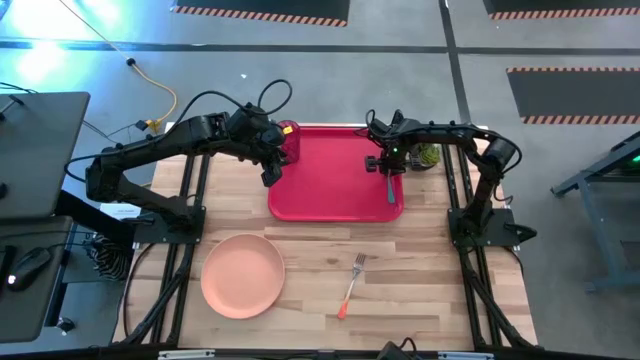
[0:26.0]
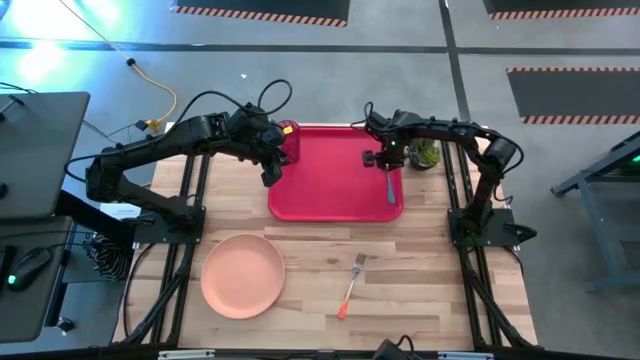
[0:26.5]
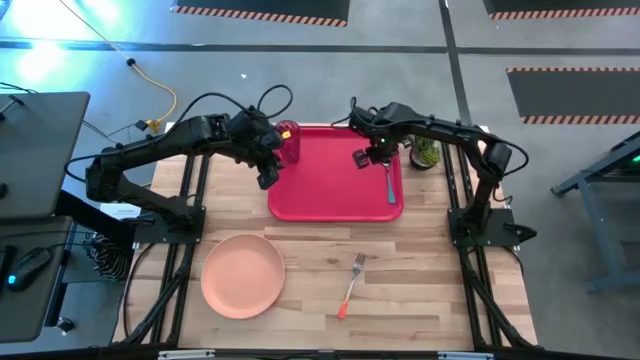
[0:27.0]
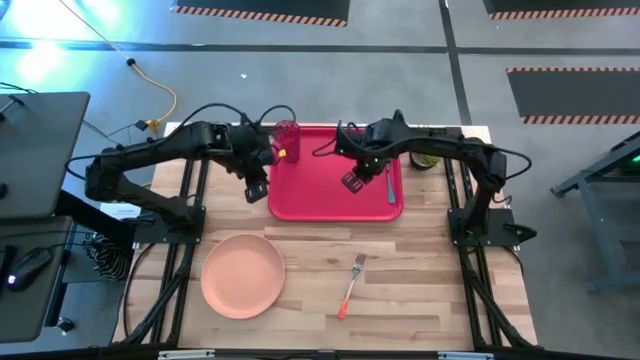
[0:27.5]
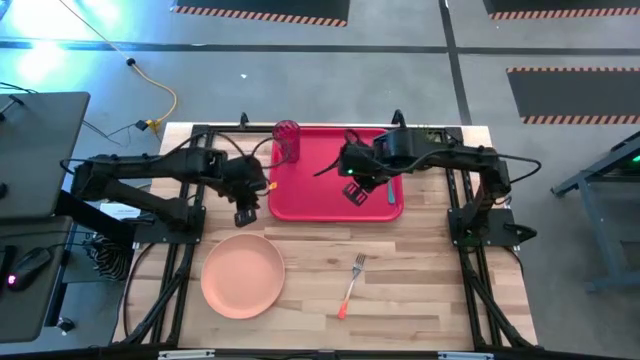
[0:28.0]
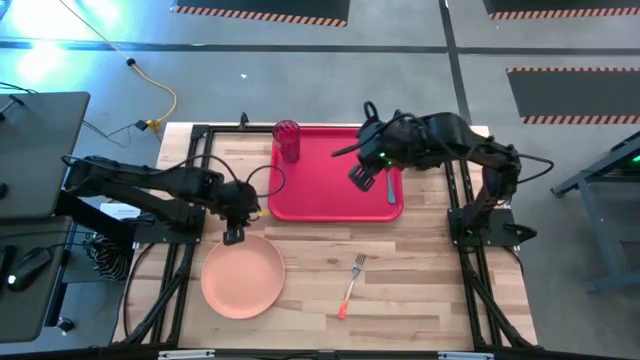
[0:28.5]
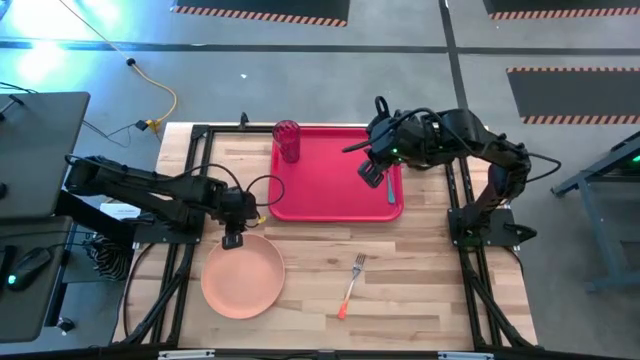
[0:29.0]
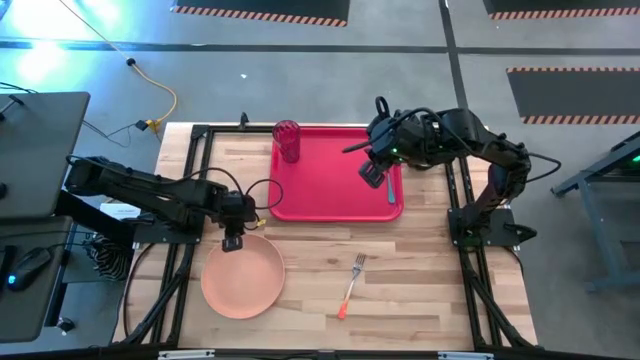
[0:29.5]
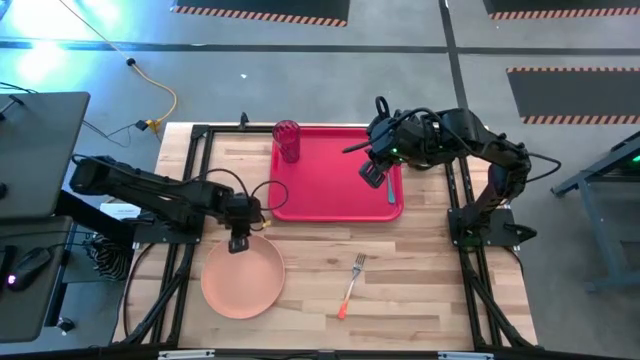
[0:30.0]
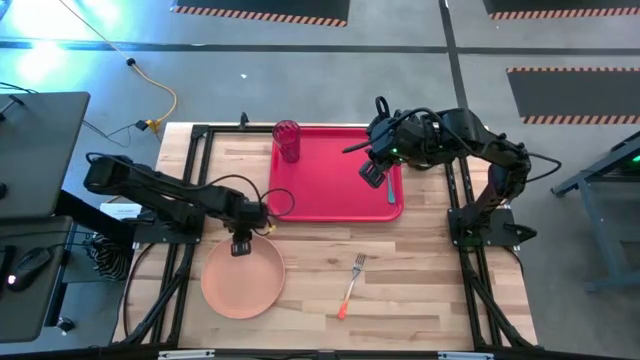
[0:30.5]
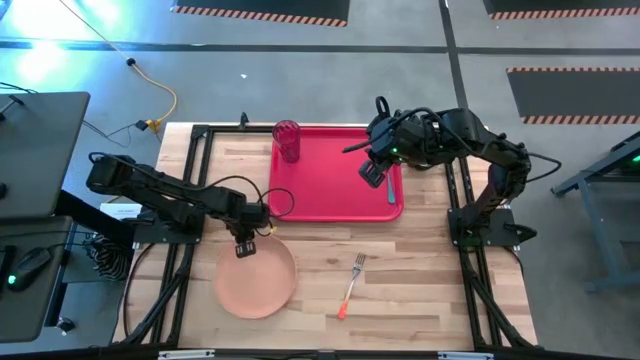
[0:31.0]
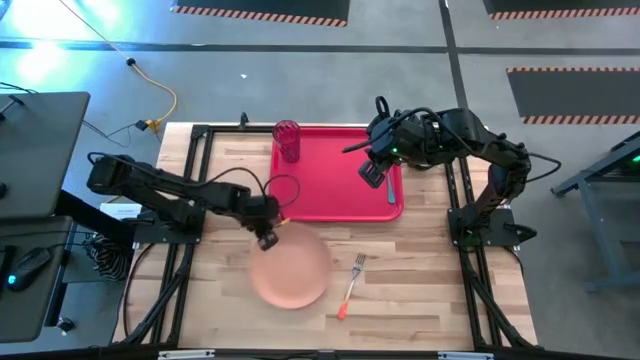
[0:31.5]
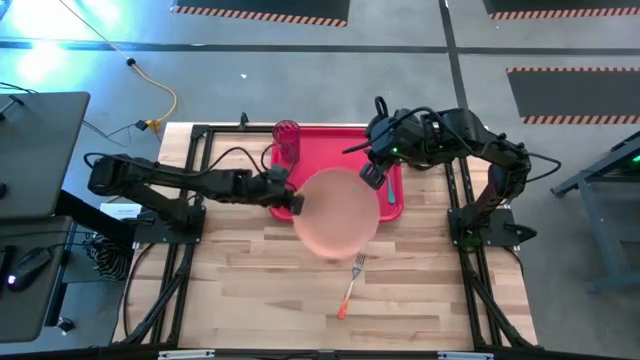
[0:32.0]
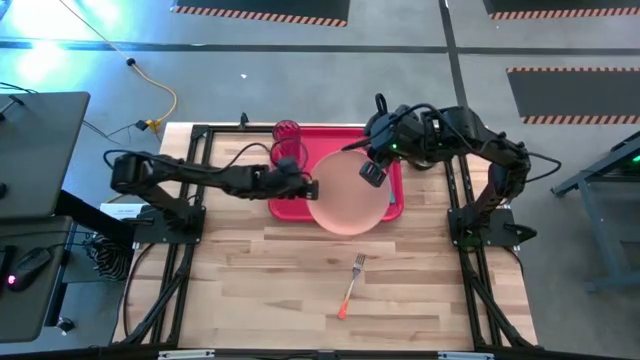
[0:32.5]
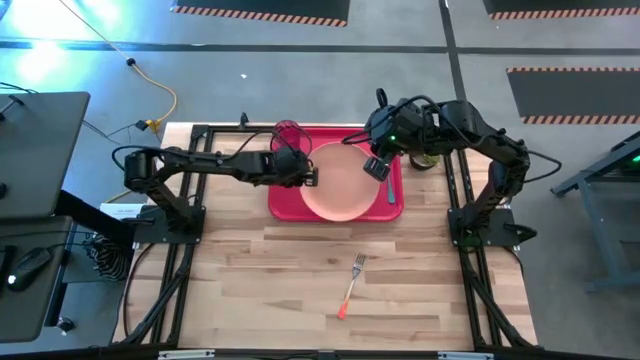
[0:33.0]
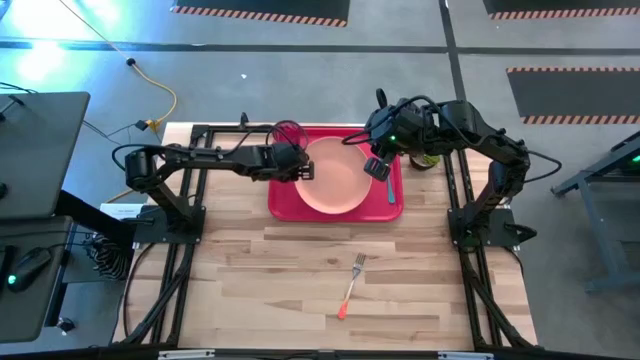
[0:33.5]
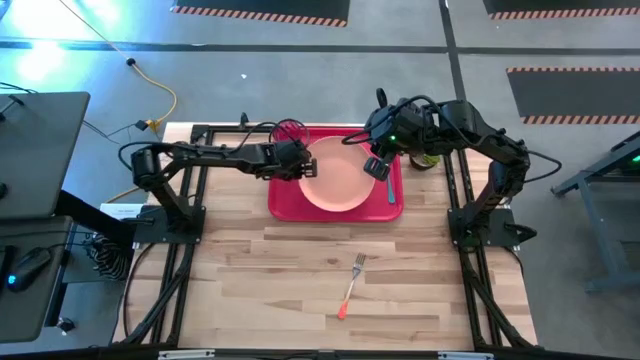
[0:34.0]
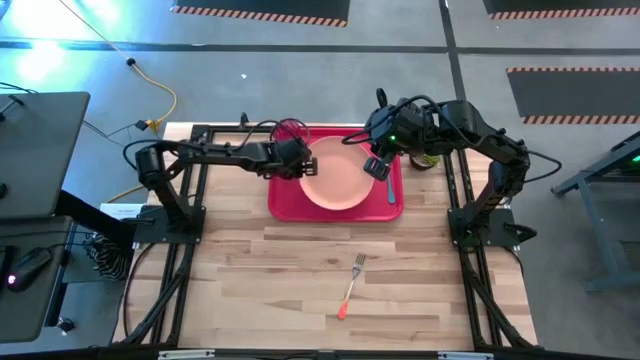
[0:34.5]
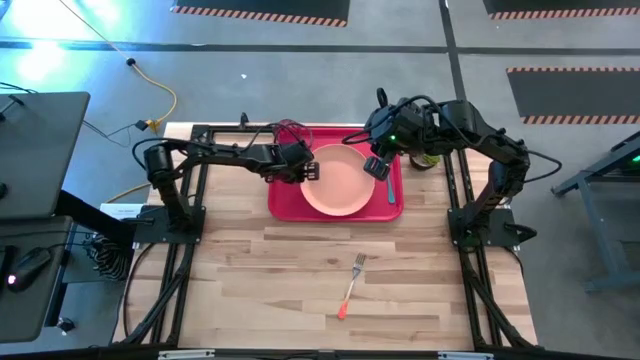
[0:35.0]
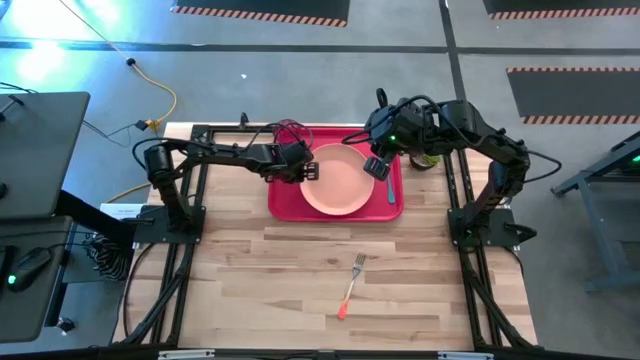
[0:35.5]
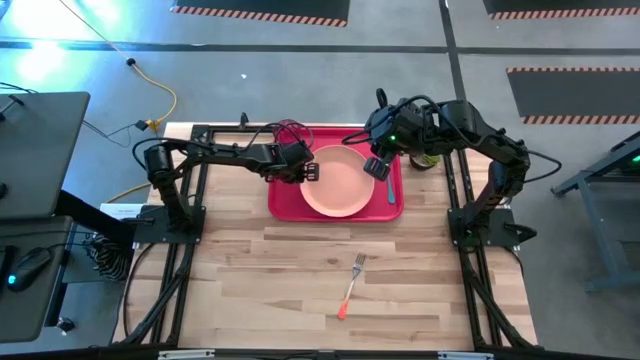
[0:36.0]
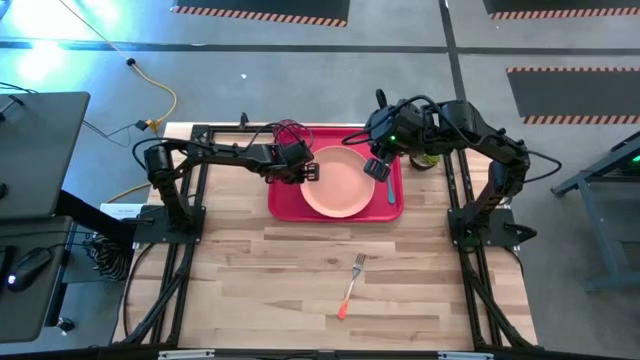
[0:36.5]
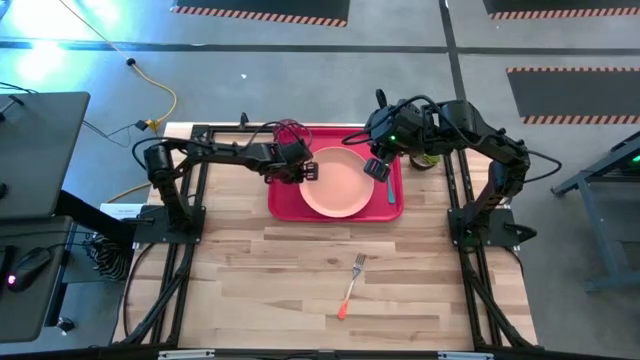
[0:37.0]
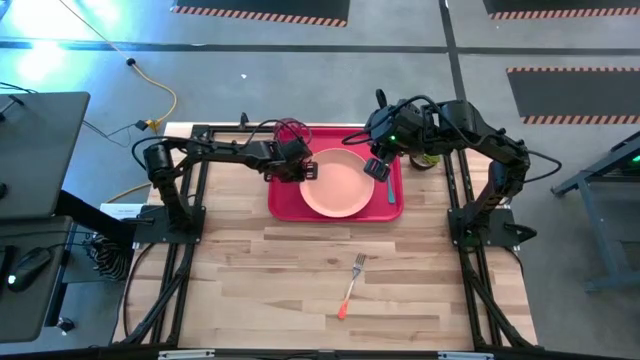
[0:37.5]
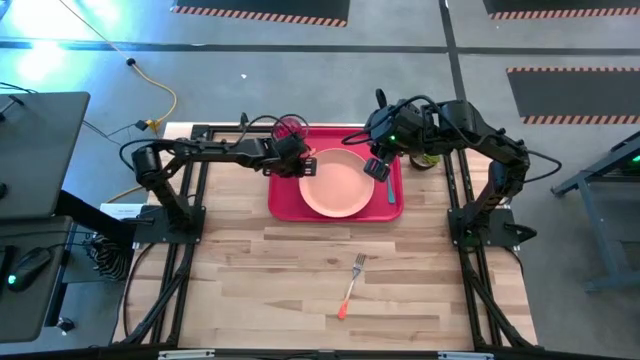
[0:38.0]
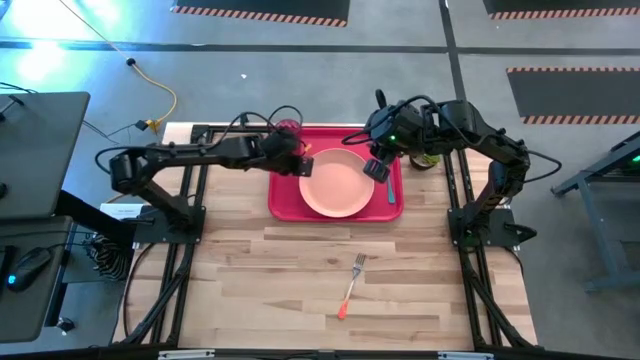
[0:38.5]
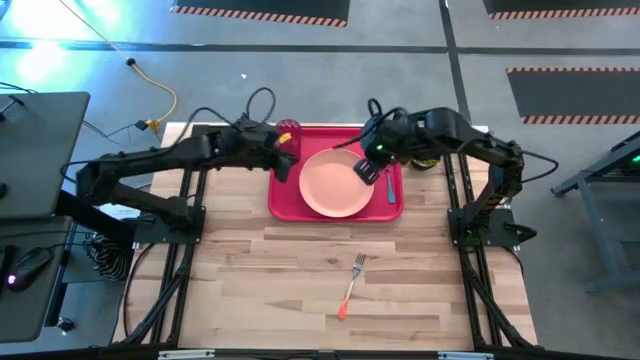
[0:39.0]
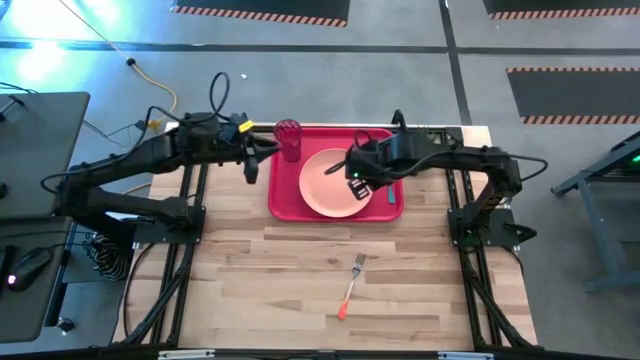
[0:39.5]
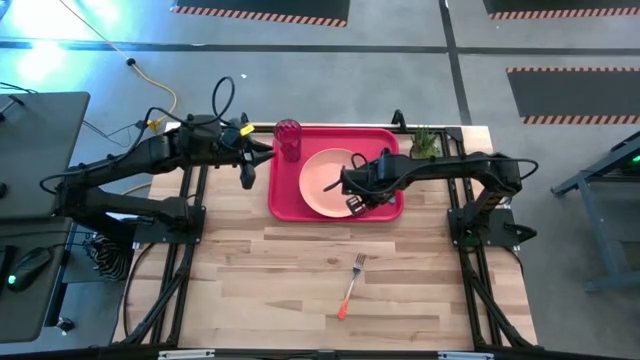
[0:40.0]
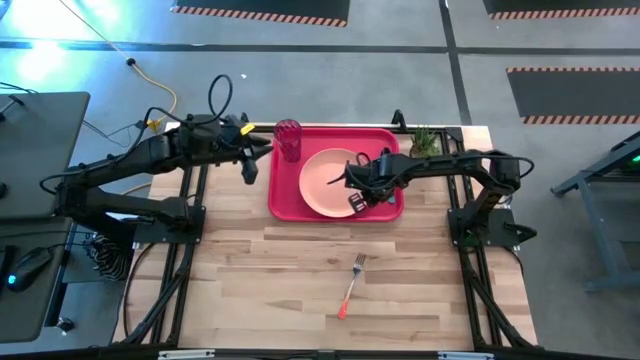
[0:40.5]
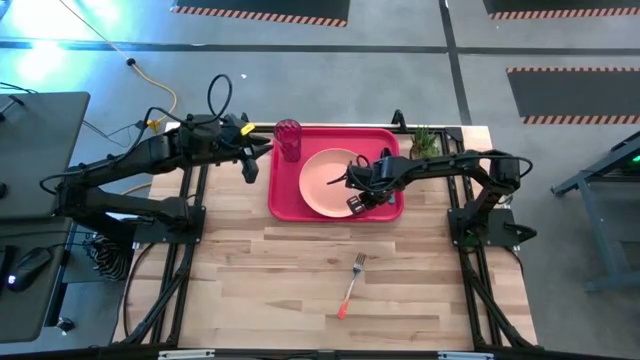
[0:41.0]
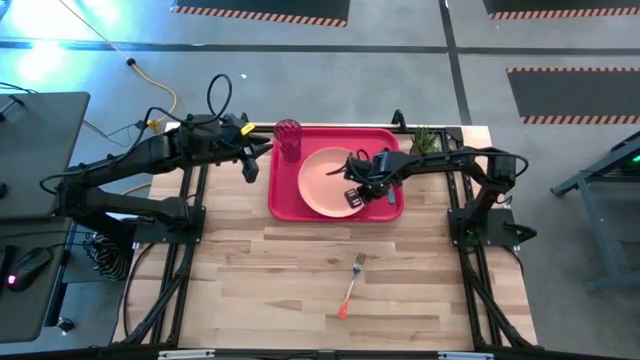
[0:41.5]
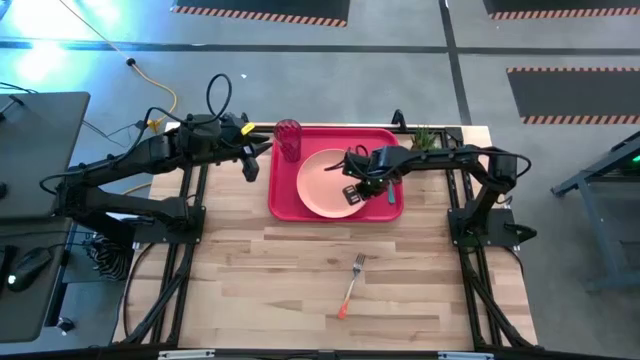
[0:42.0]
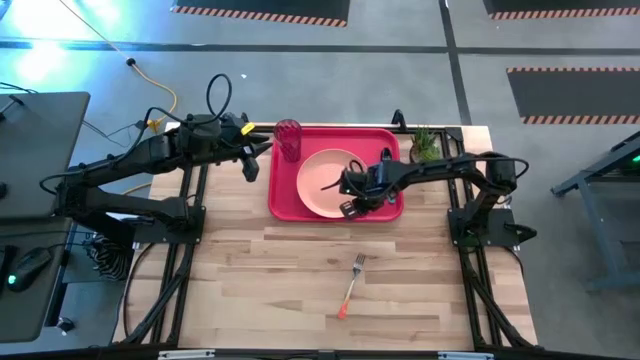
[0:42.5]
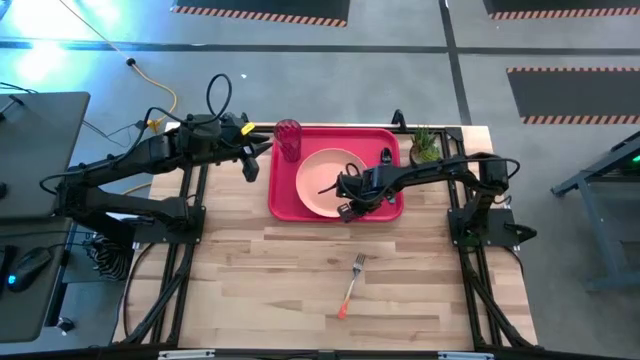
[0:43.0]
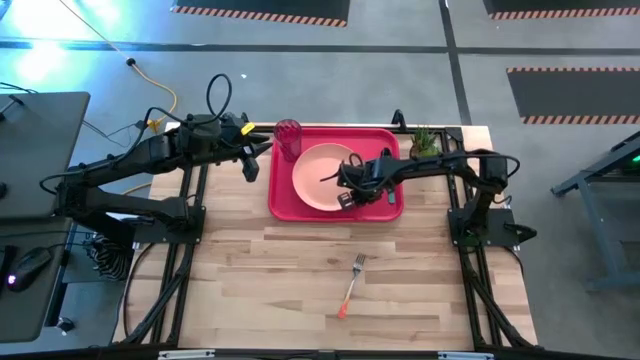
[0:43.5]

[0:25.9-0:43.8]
Task: Pick and place plate/cup/fork/spoon on tray
Put the orange plate on the red tray

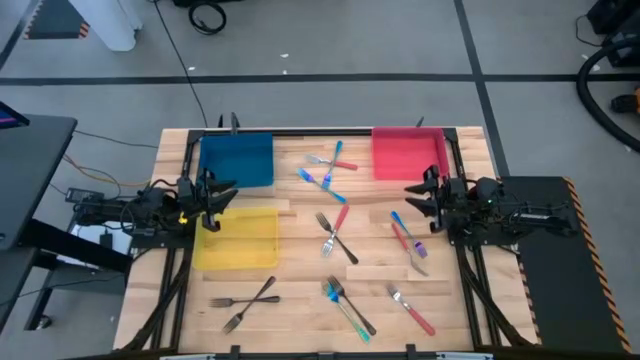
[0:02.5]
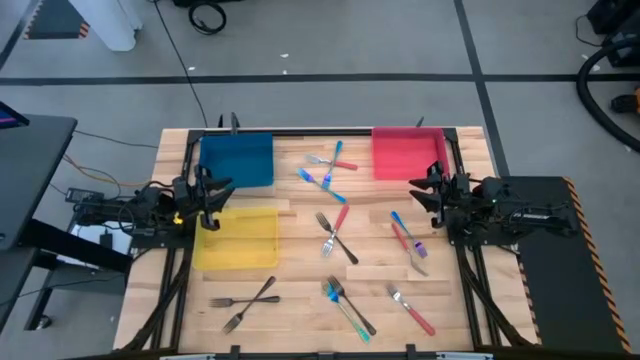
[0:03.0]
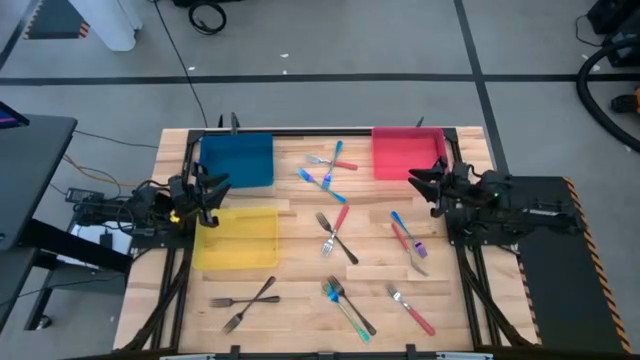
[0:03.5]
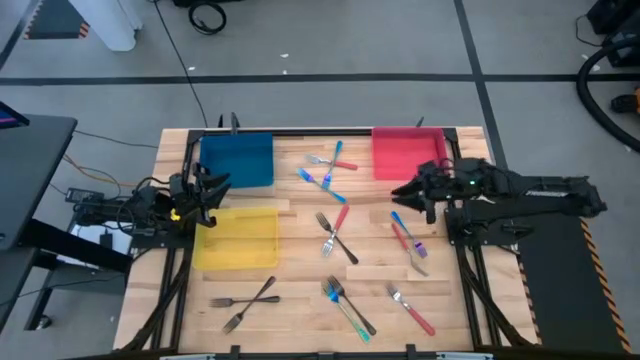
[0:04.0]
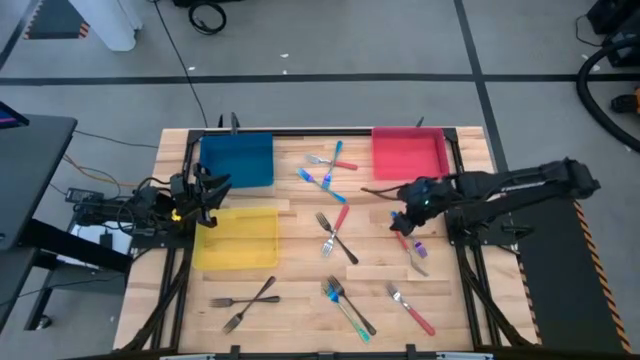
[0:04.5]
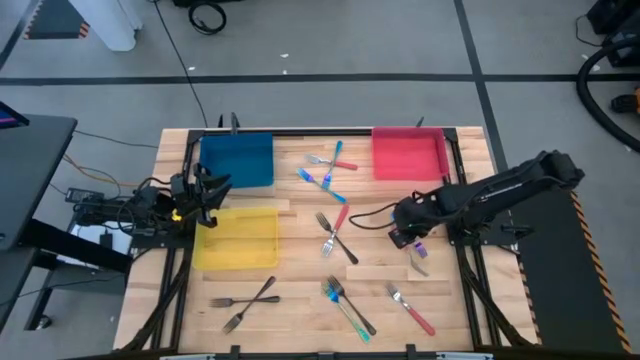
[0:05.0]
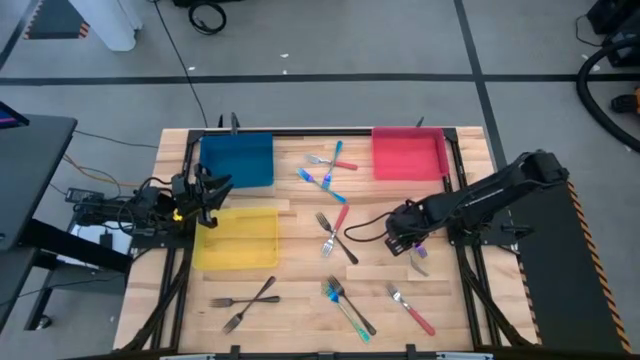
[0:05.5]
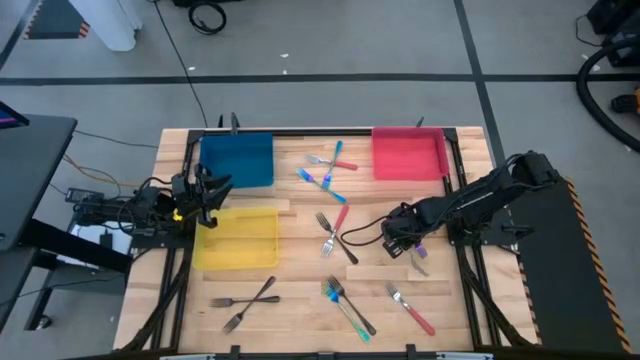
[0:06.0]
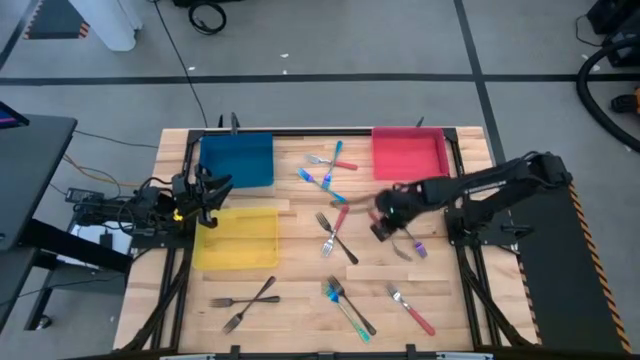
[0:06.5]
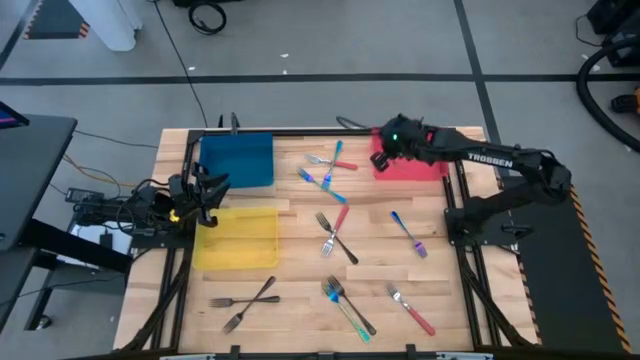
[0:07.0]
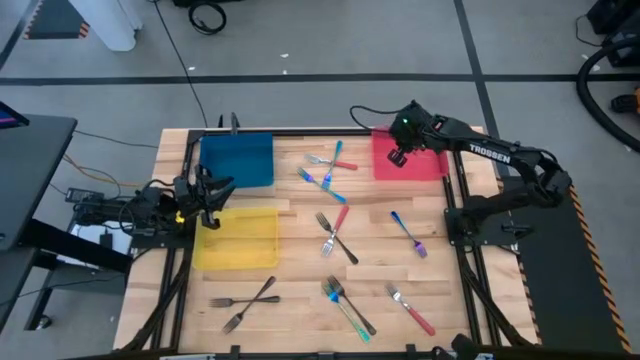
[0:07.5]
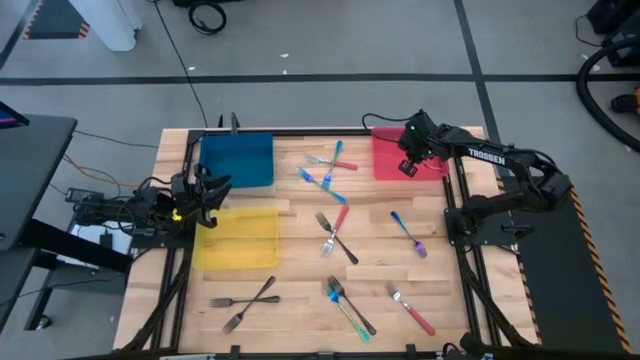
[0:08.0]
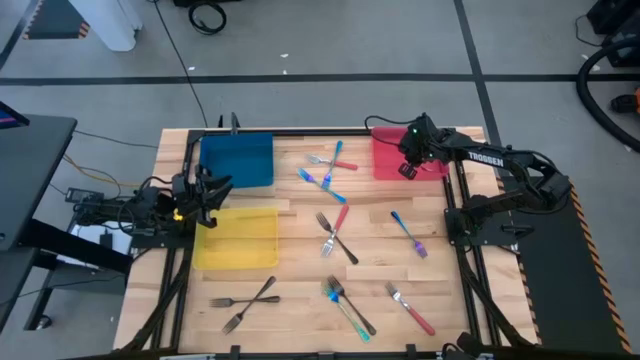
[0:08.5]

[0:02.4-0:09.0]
Task: Sort silverware by color (type)
Put the red fork into the red bin
